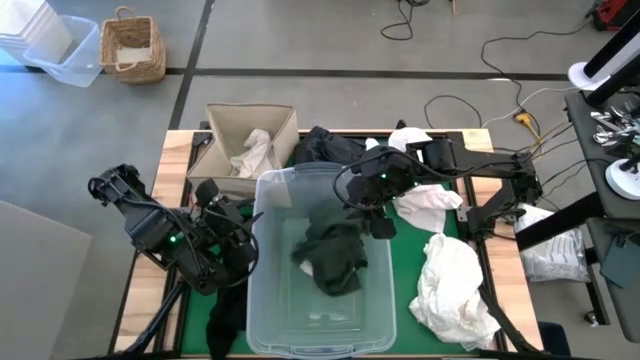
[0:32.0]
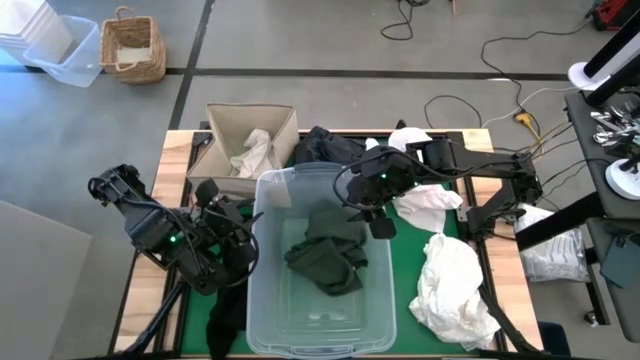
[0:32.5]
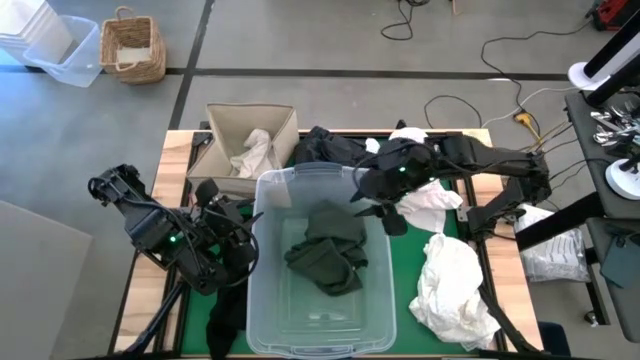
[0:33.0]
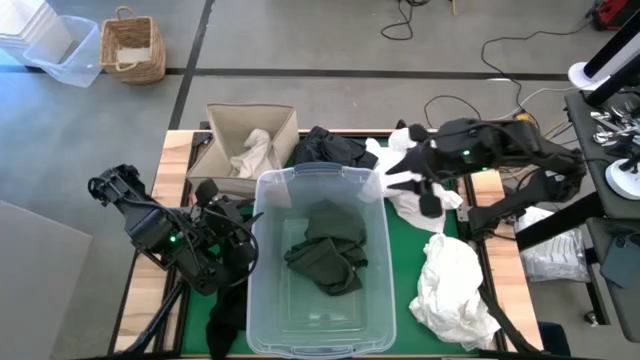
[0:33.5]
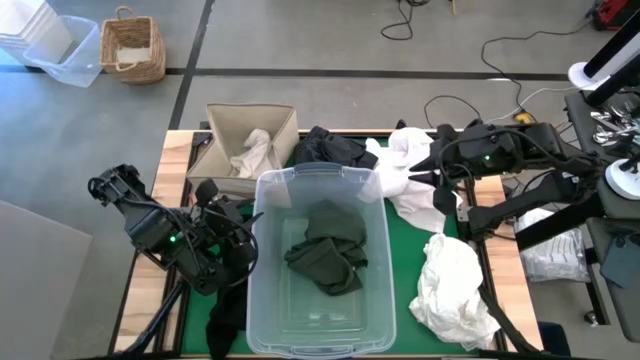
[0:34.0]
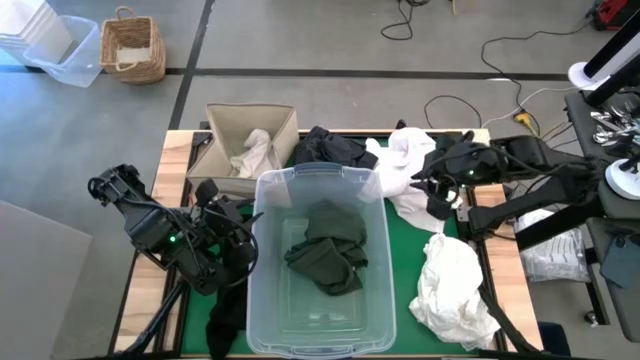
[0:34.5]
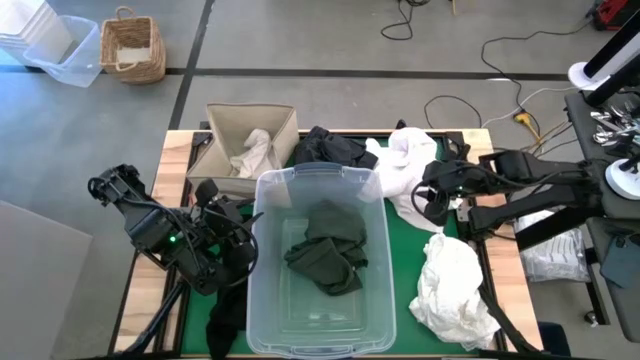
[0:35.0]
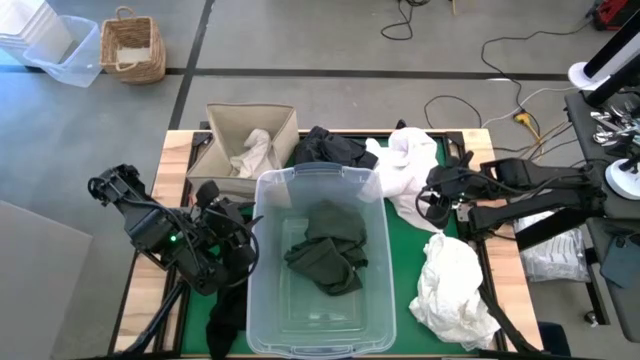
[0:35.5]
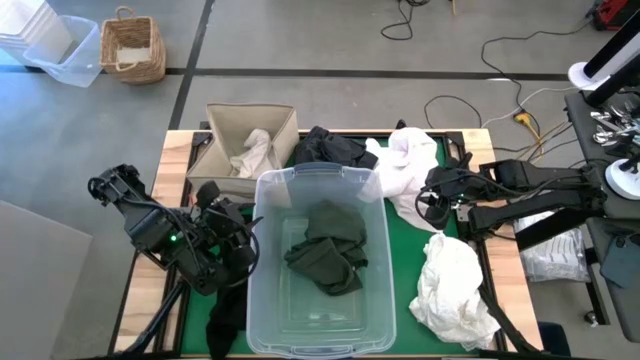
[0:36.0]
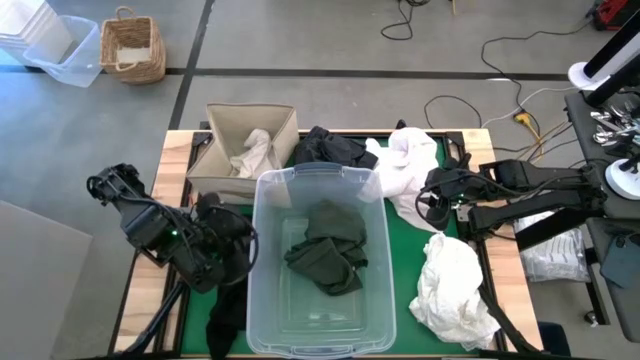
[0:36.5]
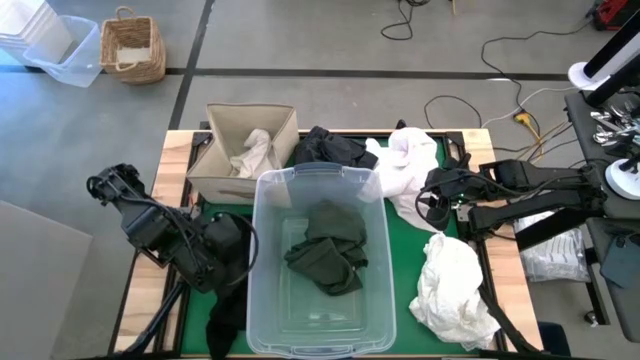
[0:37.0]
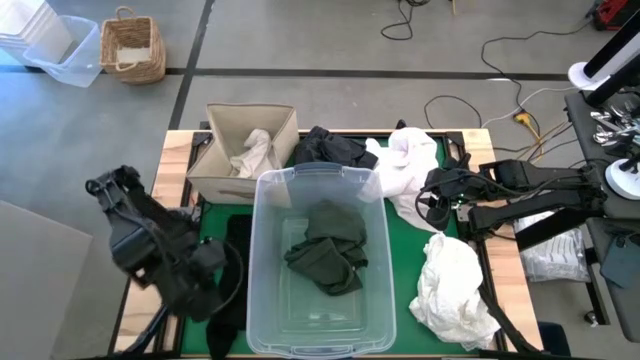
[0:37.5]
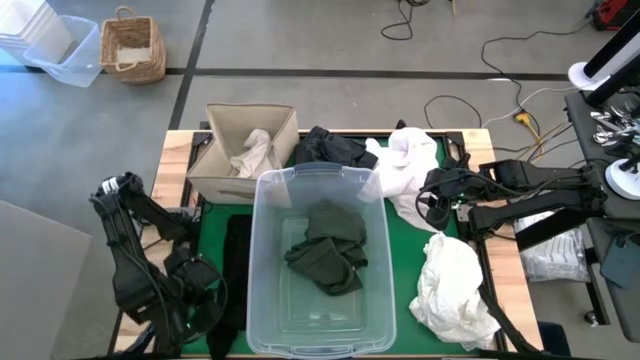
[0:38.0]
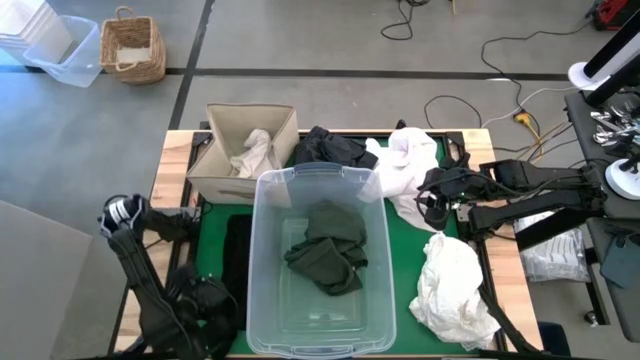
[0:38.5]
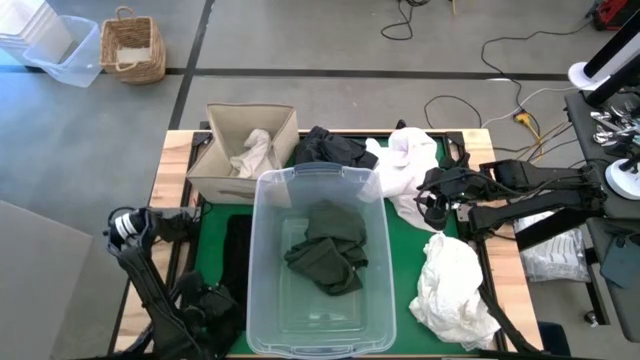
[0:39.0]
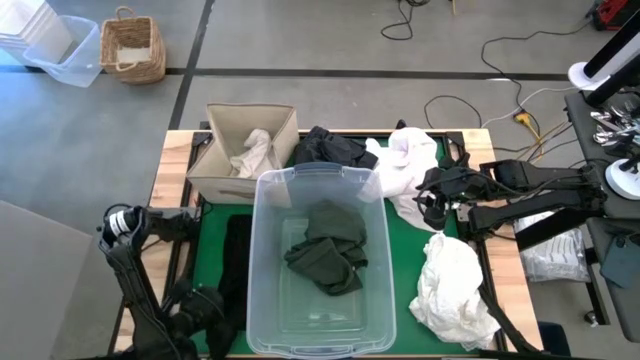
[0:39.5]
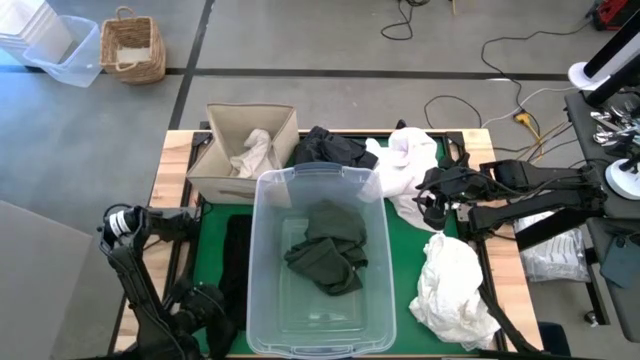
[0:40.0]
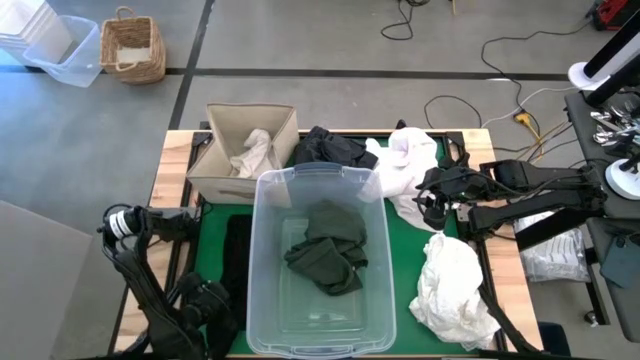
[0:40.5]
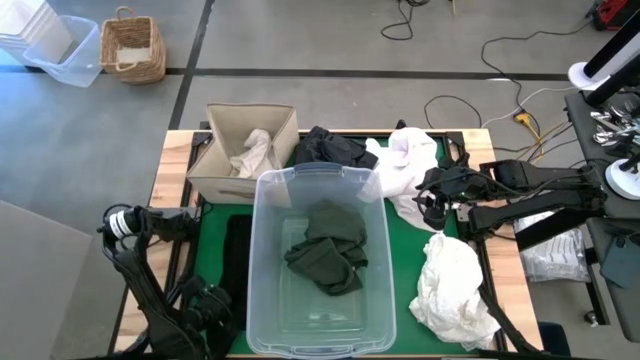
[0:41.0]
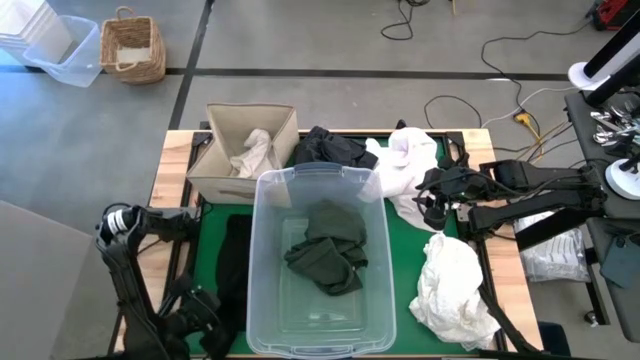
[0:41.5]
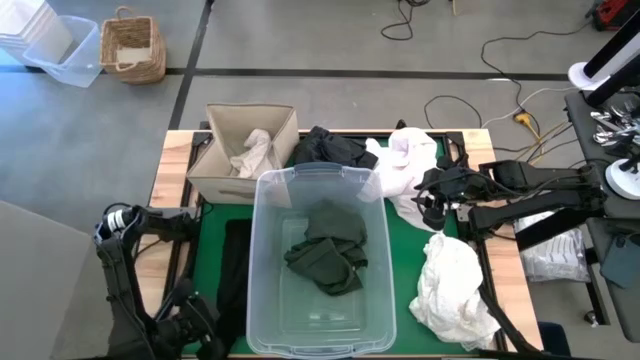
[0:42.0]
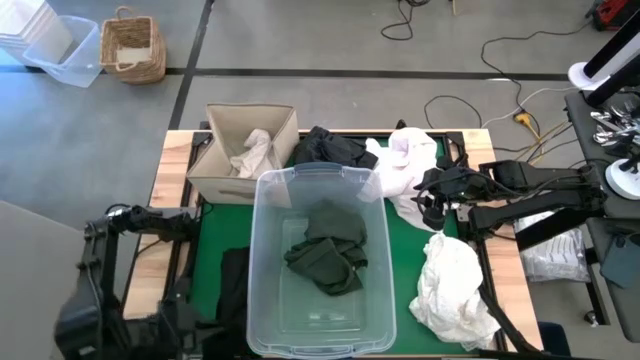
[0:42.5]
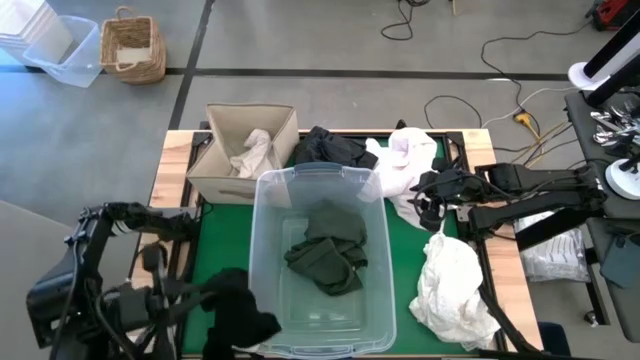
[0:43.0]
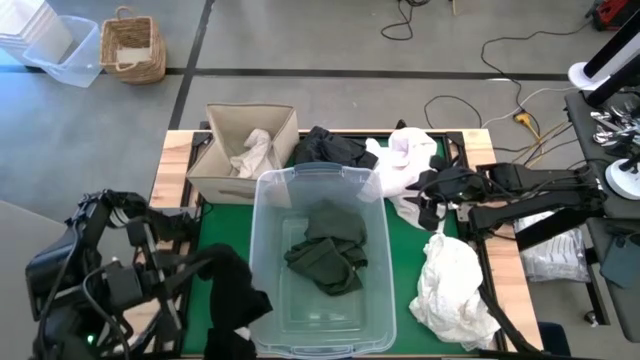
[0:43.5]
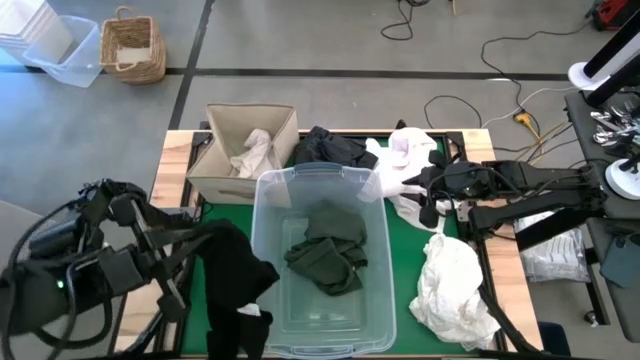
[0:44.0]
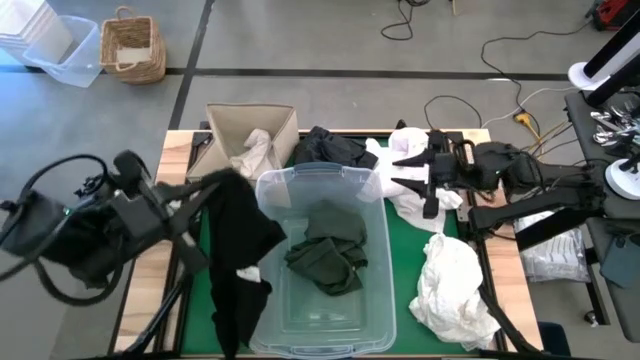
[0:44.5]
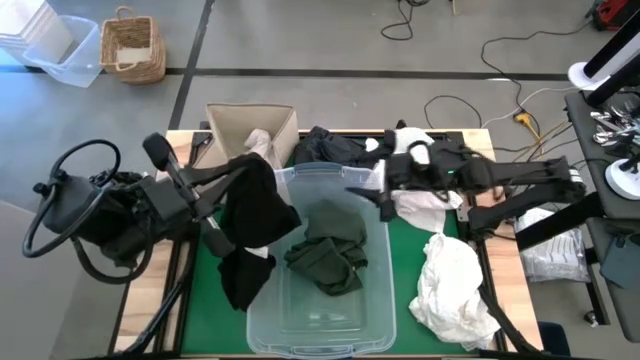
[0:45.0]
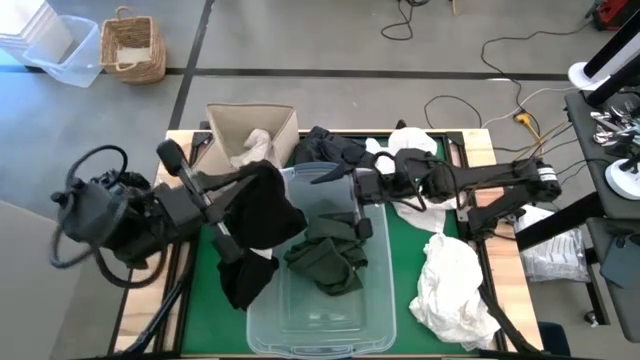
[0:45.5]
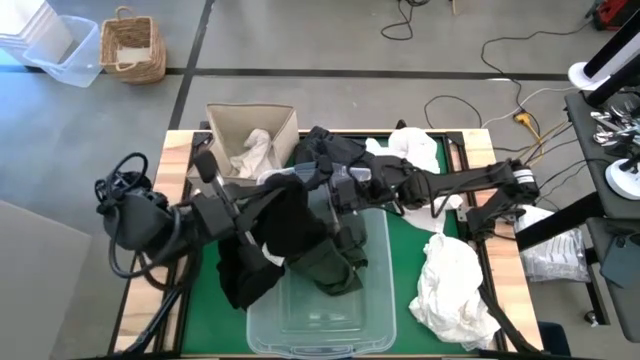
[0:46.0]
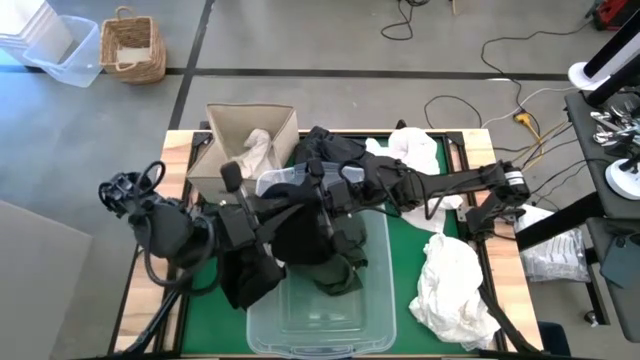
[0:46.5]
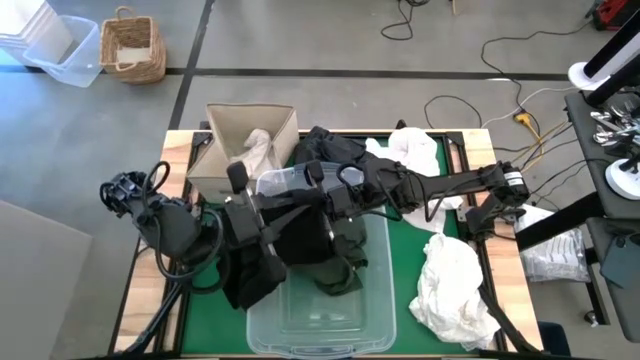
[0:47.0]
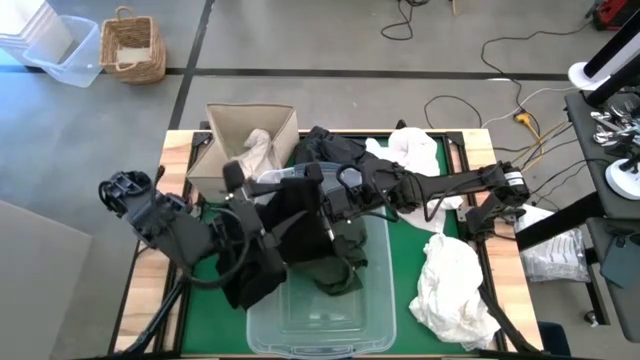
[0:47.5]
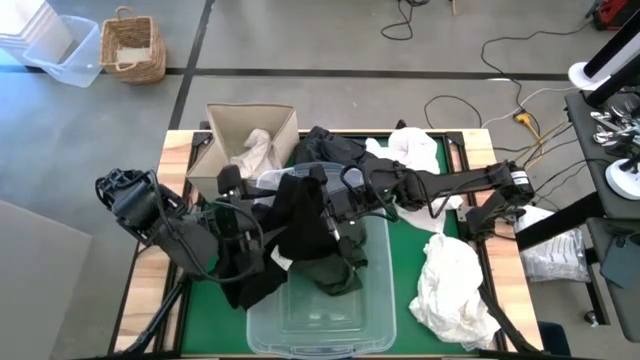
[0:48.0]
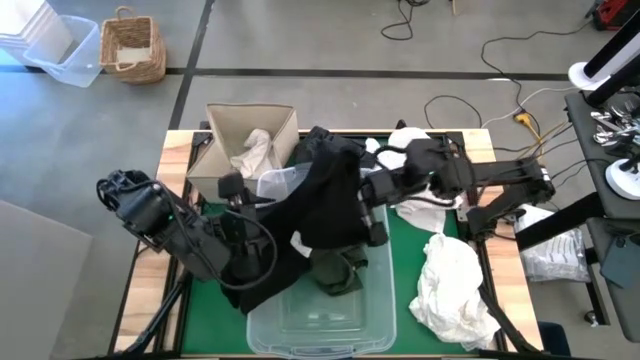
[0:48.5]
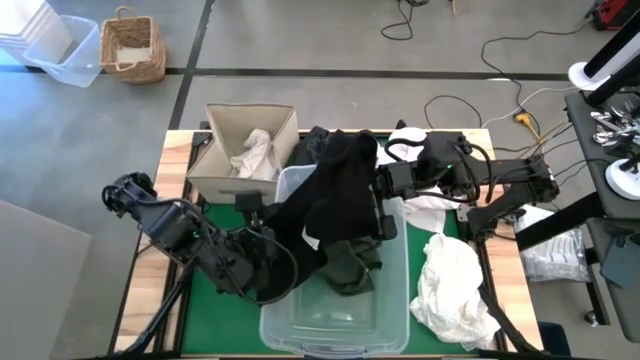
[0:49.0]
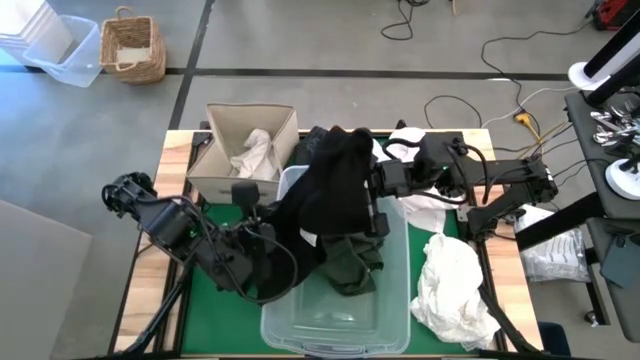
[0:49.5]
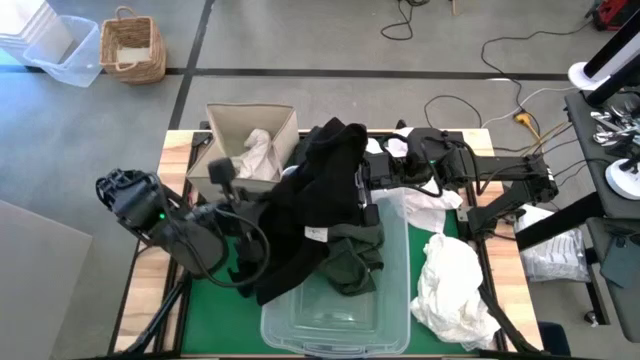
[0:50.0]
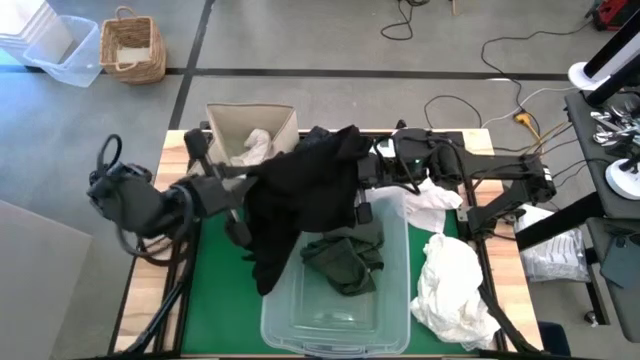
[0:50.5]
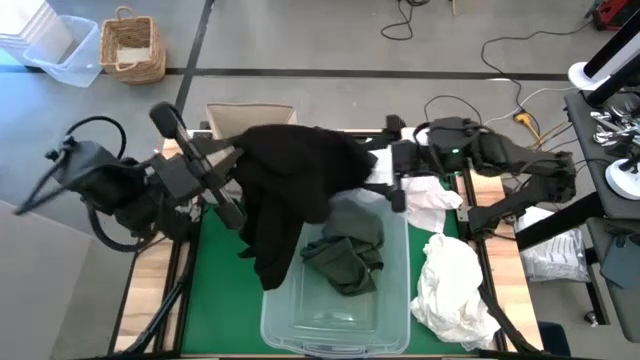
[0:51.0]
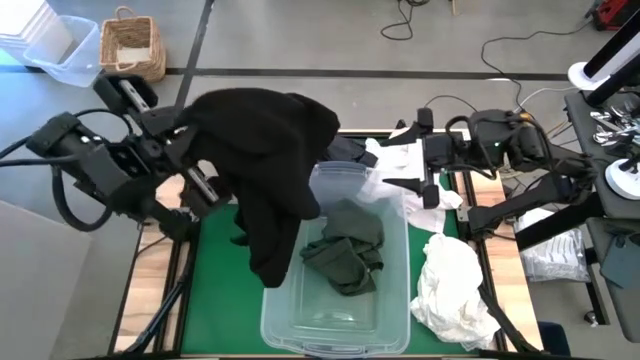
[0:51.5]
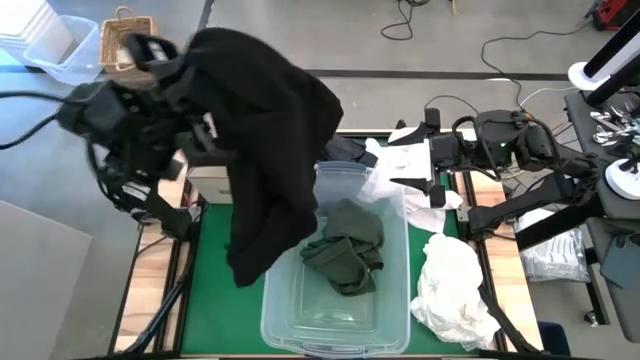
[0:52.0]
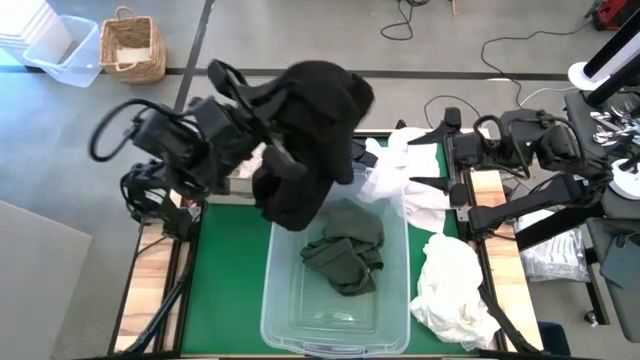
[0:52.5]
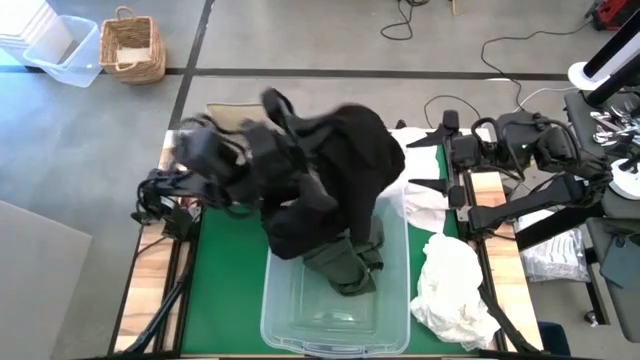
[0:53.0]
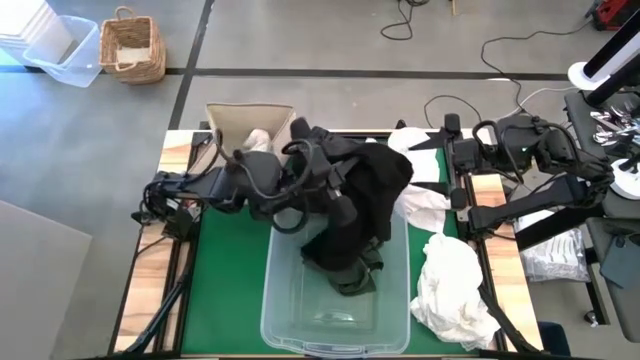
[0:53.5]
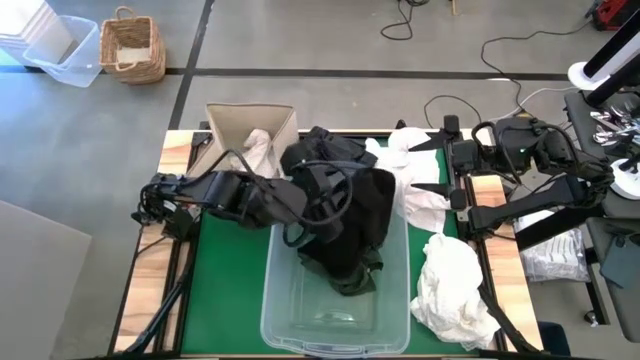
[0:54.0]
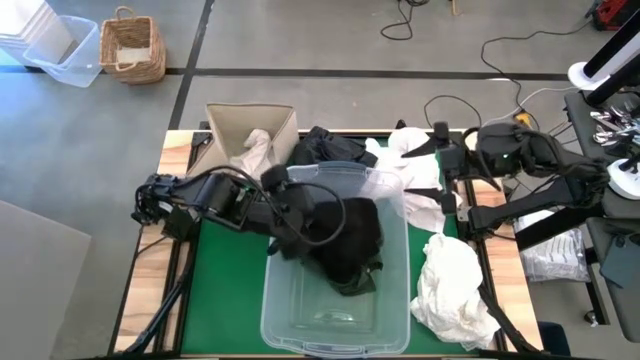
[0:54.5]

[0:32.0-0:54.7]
Put the black shirt into the transparent bin
